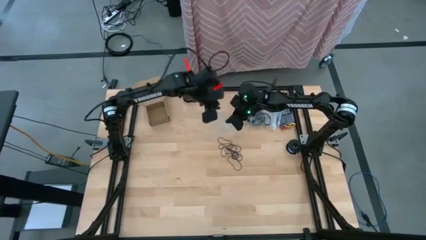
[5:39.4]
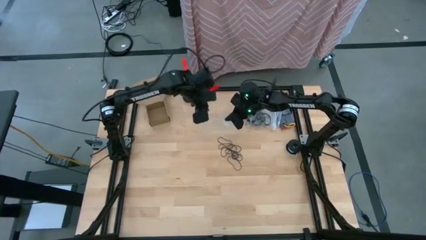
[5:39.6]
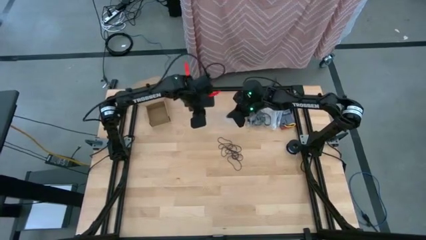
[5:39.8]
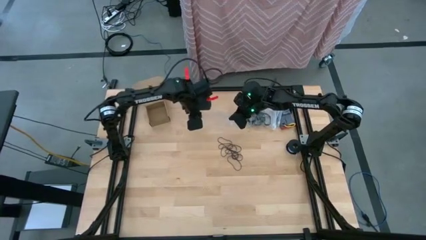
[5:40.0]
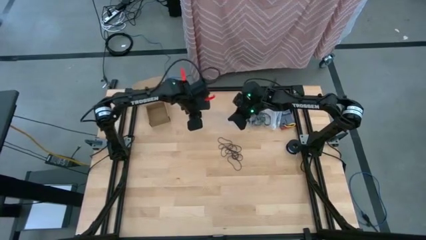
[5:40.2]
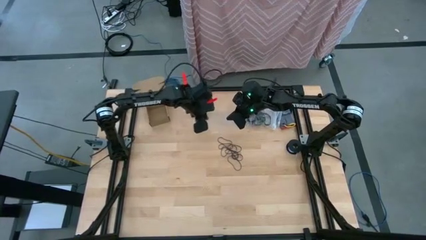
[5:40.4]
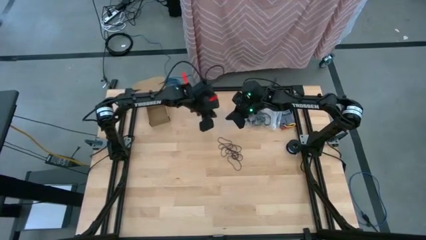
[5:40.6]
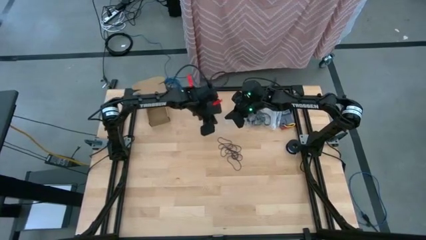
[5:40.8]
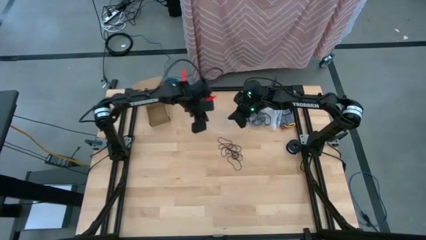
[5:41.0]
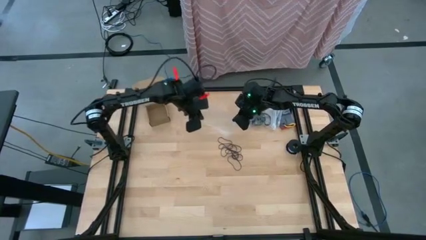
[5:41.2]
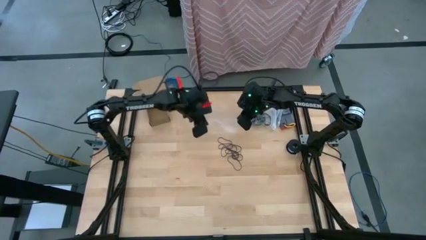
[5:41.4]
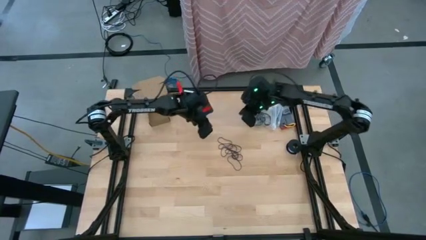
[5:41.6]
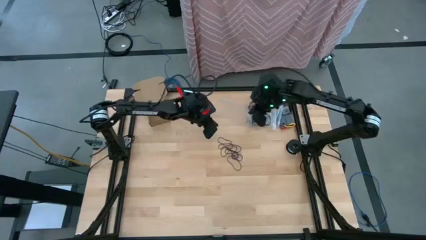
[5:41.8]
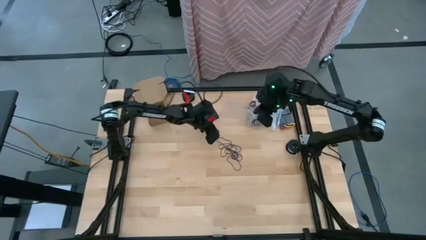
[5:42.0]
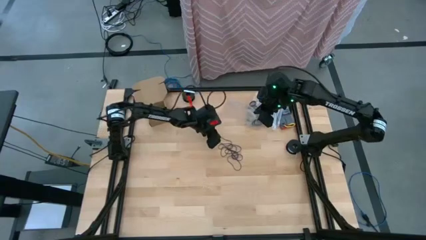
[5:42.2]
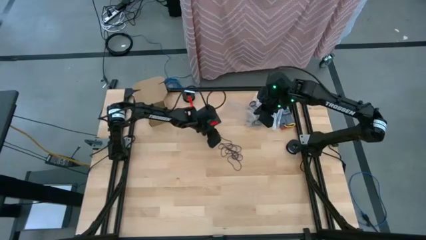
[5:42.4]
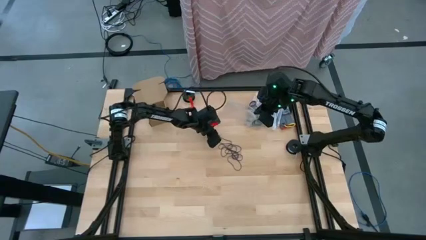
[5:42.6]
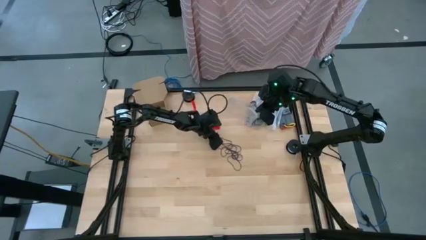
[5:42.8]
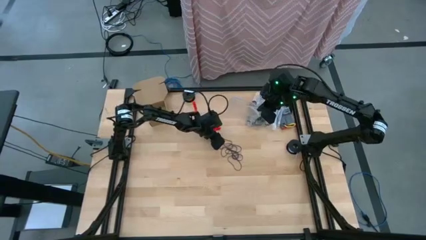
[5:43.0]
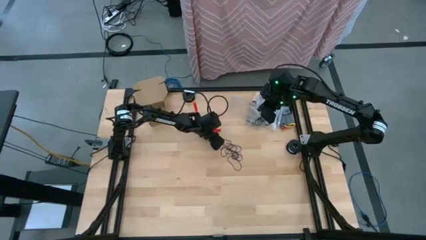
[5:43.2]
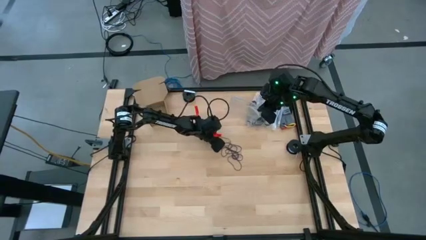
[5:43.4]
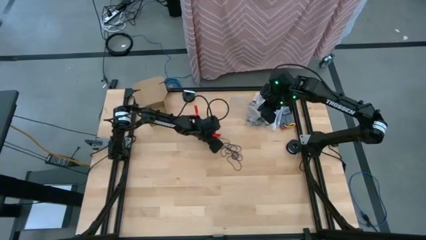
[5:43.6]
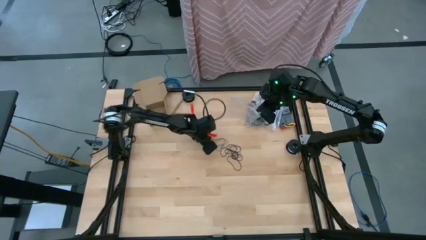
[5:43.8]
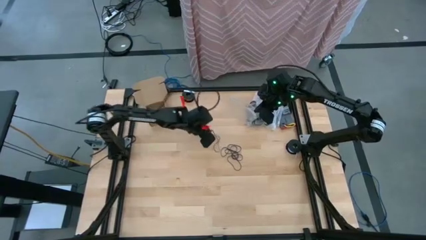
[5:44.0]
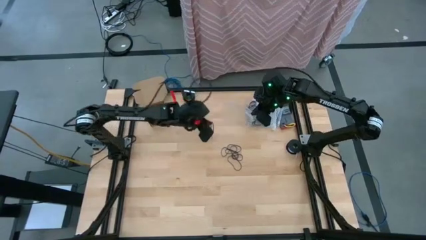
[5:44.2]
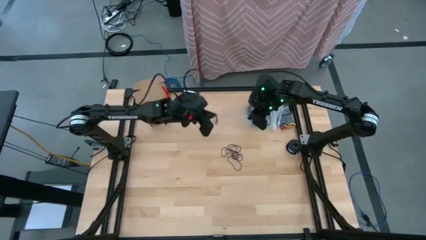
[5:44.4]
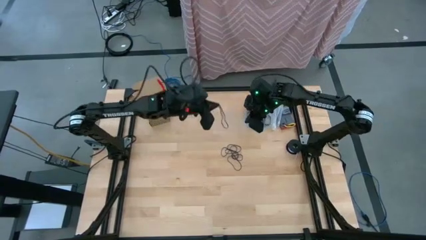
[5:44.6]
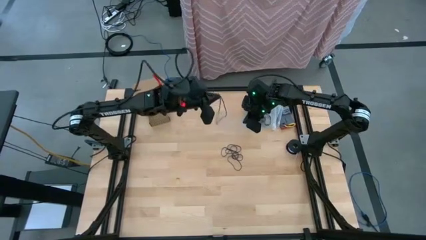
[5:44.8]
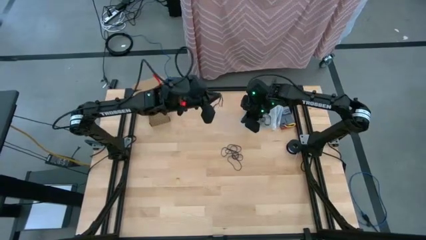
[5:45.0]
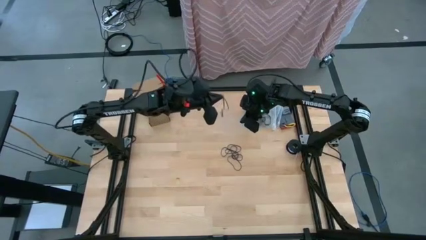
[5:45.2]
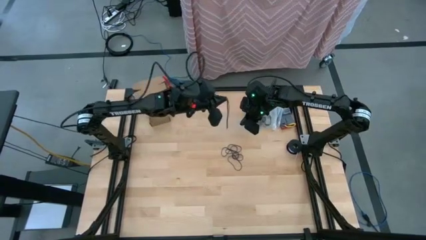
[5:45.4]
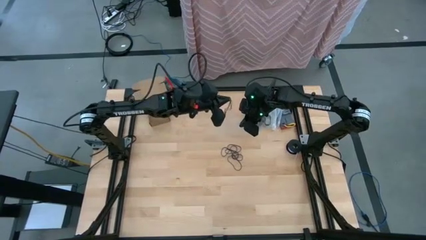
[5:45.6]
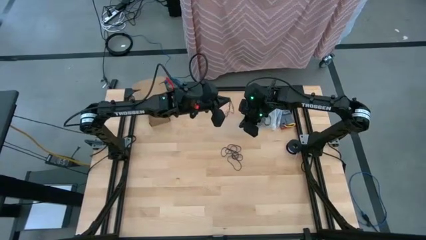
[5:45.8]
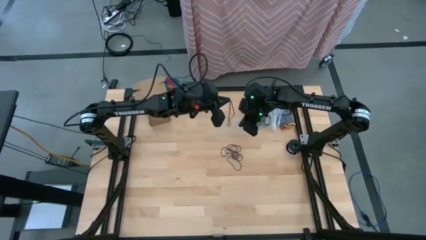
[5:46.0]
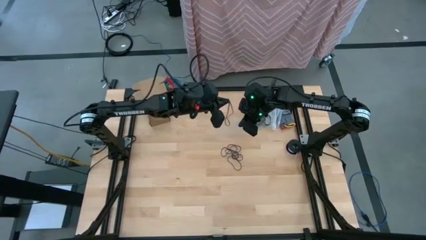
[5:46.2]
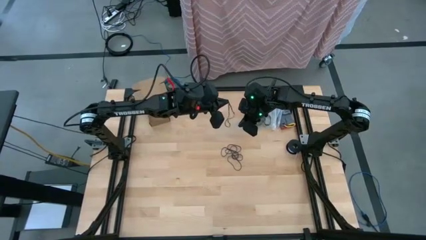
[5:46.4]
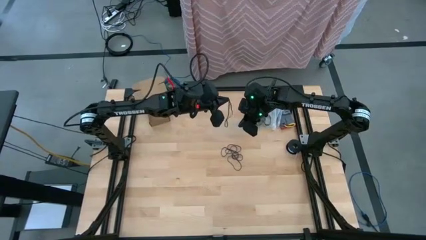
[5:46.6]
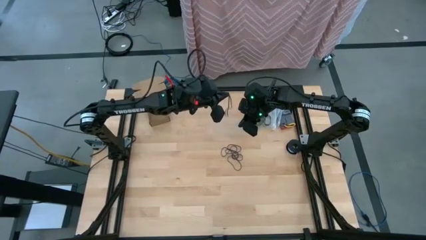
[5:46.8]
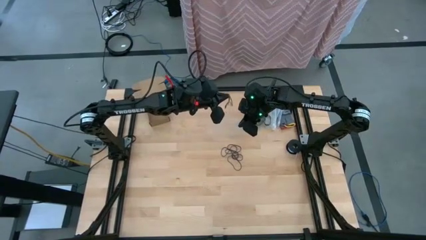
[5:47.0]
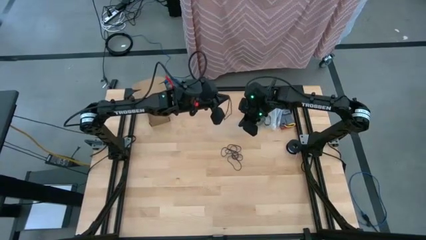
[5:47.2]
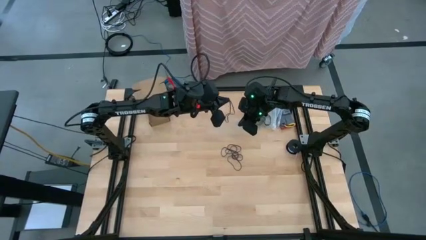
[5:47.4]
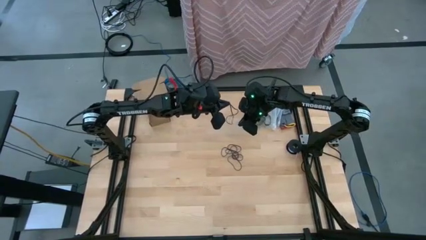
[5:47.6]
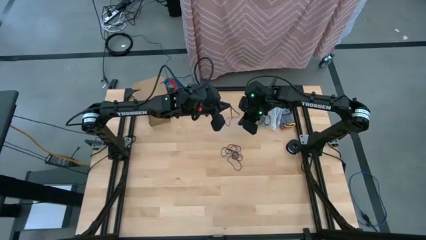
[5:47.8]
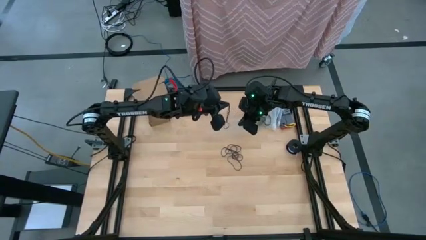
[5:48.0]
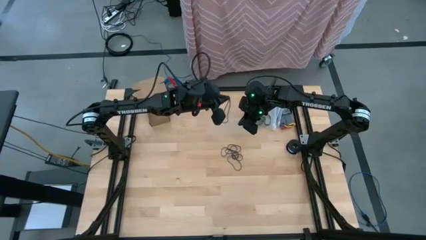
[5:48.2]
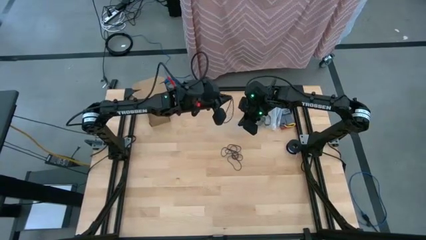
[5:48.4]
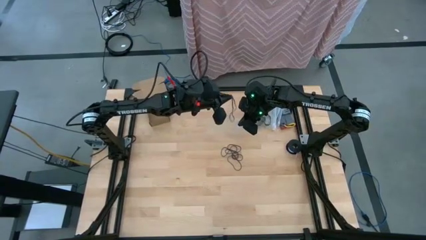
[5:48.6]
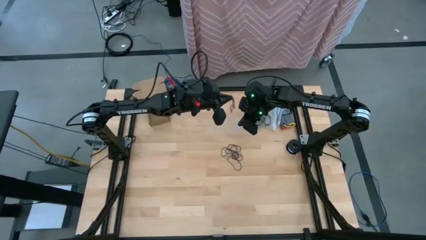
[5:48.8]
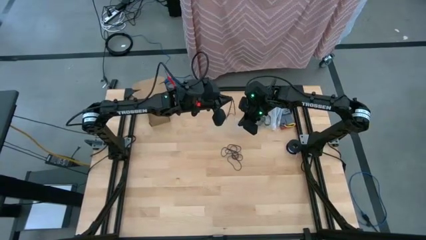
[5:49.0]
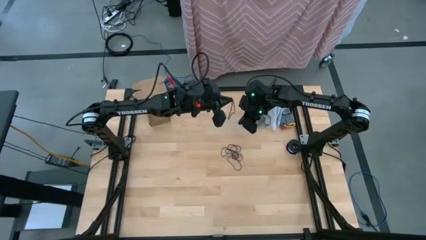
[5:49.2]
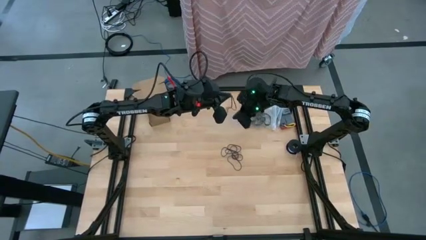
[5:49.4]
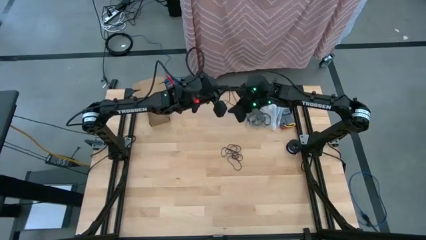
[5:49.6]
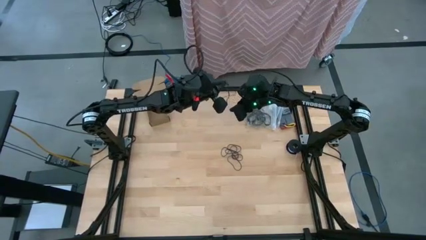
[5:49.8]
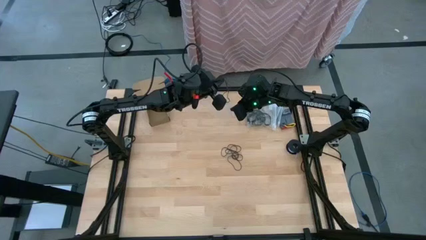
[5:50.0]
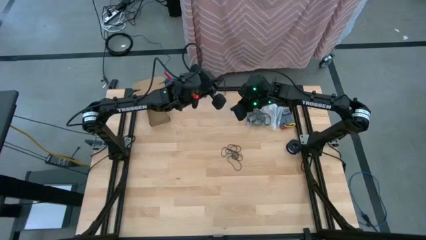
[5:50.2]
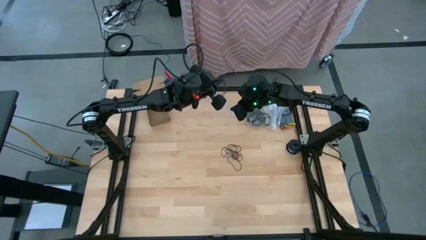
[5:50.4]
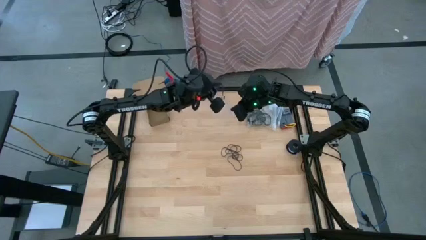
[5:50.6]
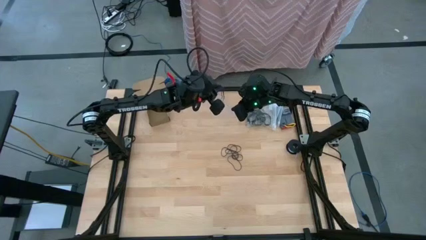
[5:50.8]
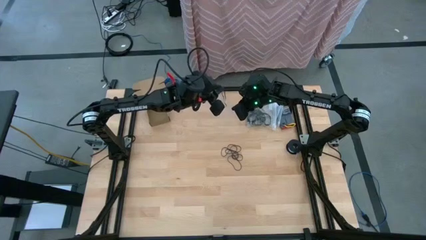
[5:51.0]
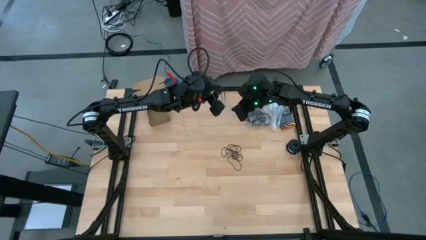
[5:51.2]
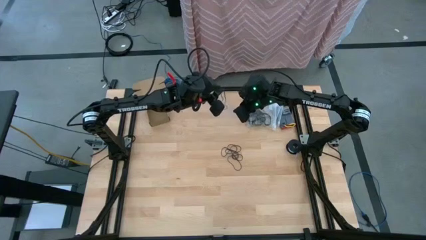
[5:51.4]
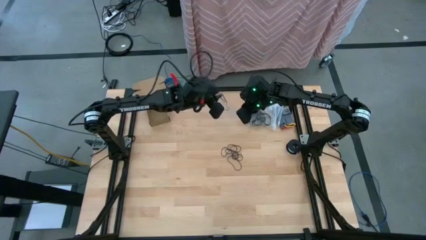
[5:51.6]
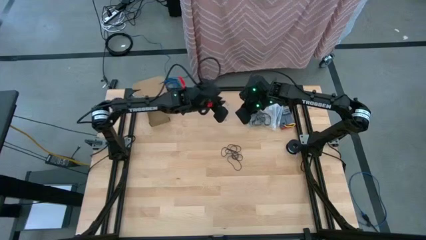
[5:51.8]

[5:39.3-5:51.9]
Task: Sort rubber bands
Put the black rubber band into the transparent zip bag

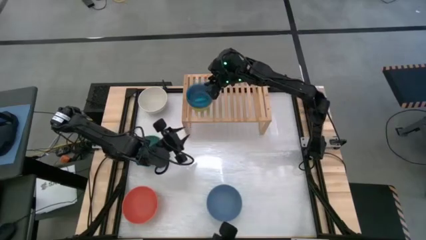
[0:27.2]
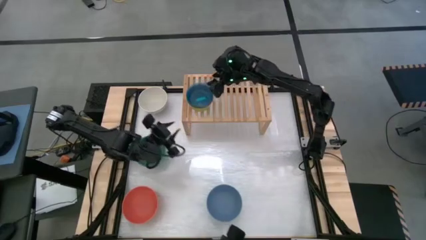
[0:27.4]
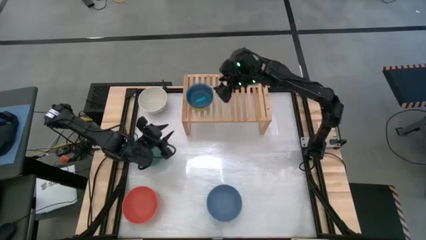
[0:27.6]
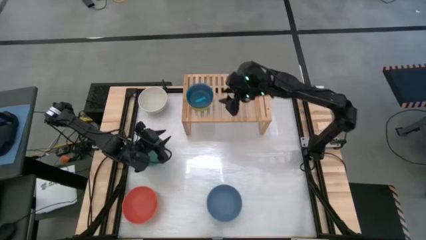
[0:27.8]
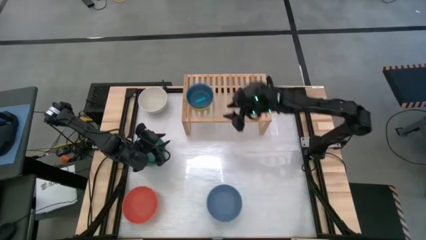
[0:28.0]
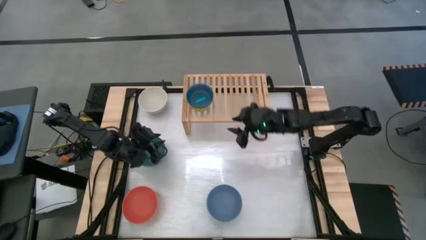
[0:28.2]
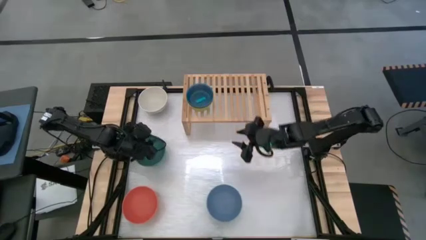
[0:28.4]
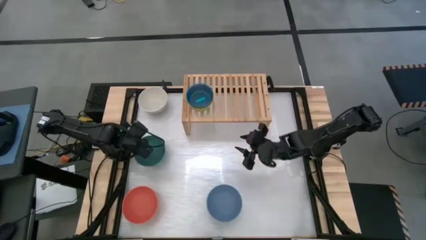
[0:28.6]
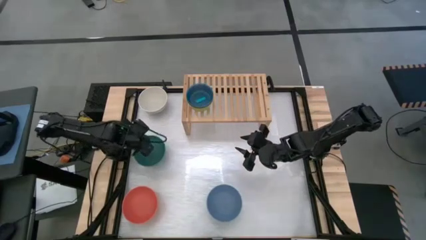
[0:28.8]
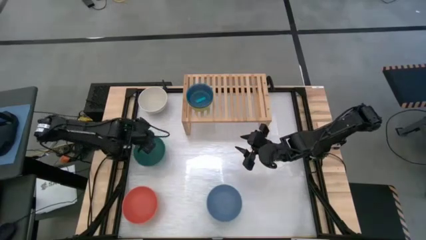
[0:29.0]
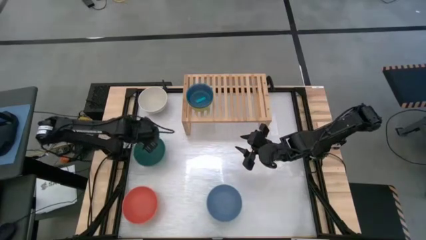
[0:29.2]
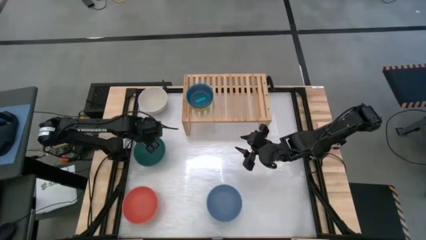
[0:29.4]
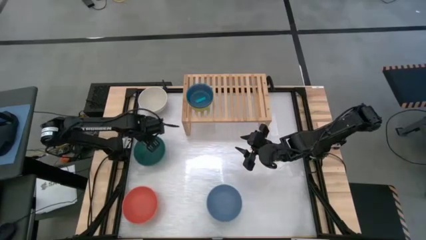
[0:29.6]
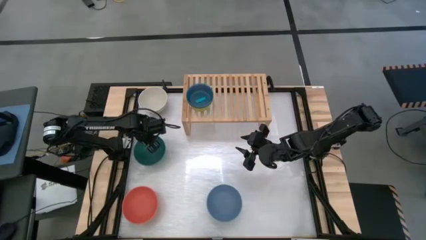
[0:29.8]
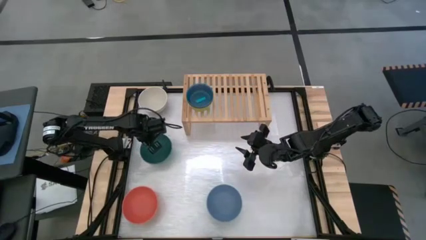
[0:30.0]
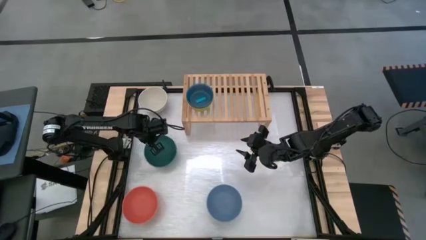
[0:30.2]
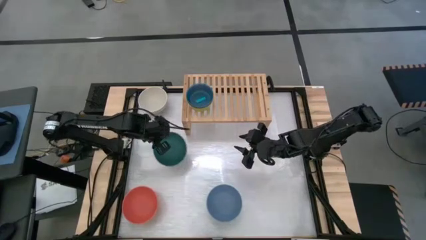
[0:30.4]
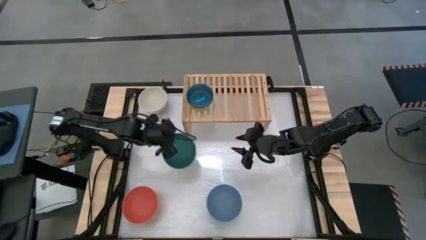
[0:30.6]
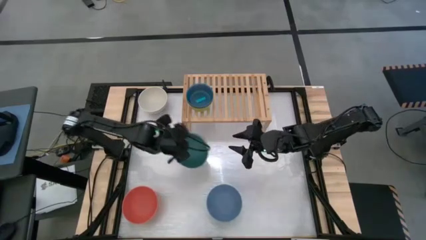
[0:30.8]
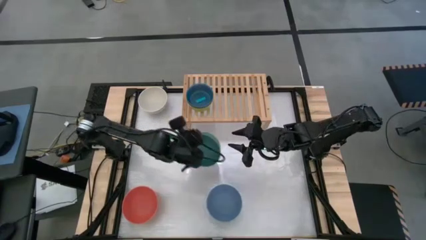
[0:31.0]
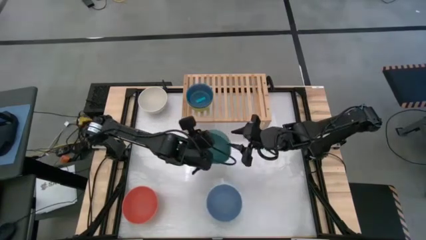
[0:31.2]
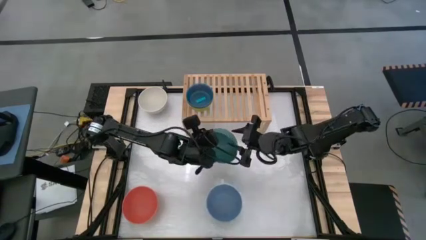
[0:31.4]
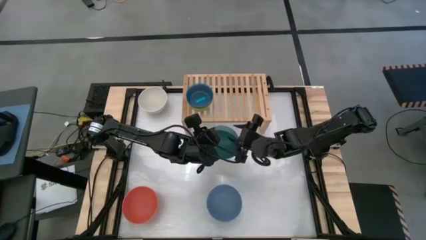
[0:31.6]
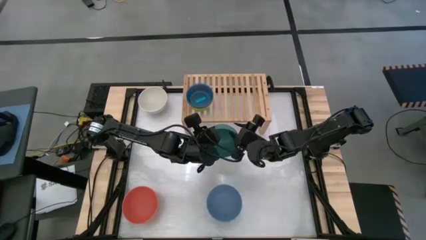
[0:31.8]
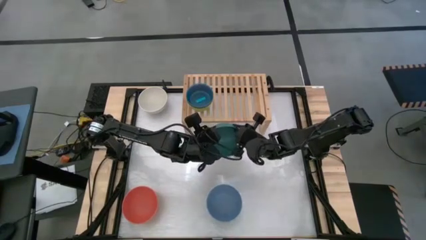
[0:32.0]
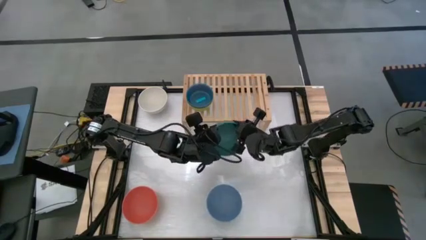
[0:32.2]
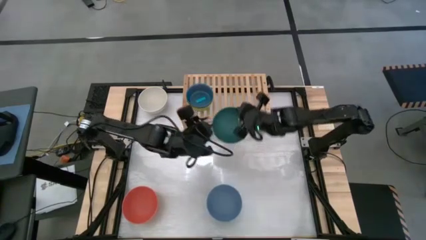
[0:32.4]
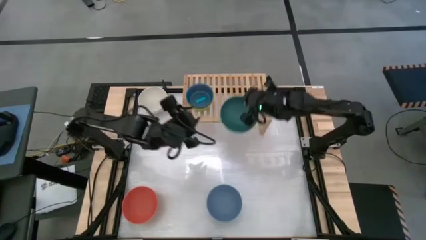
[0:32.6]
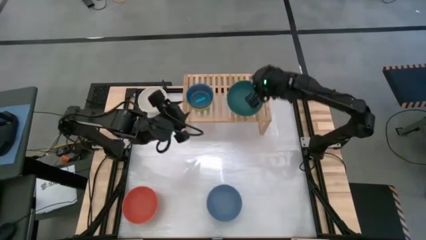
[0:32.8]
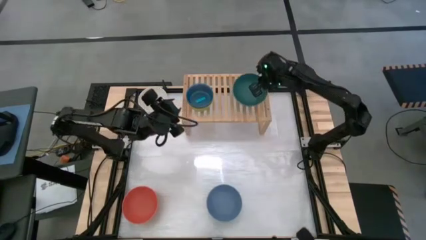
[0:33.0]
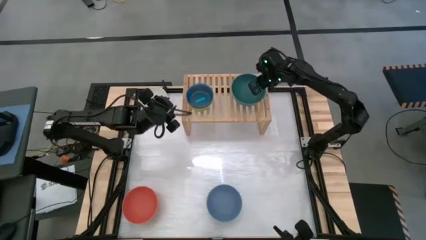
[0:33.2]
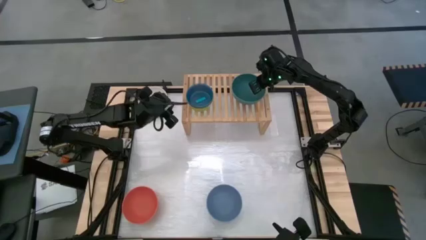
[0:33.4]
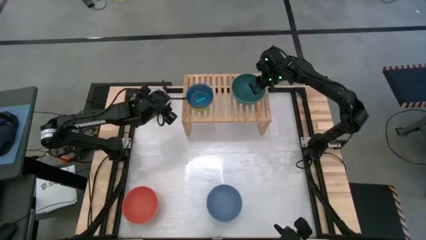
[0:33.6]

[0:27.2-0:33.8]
Task: Place and stack bowls onto a shelf
Put the large dark green bowl on the shelf
